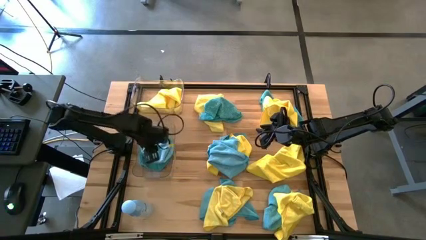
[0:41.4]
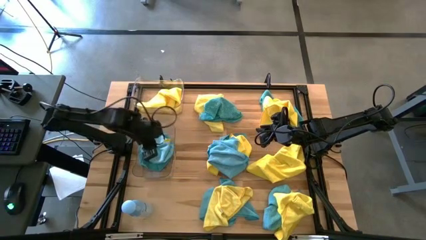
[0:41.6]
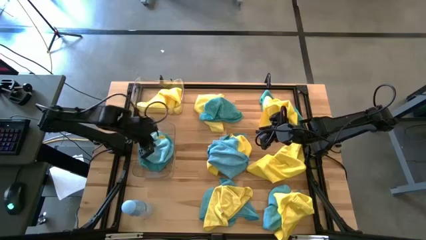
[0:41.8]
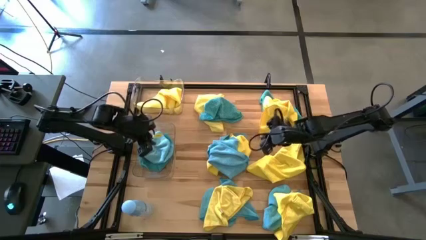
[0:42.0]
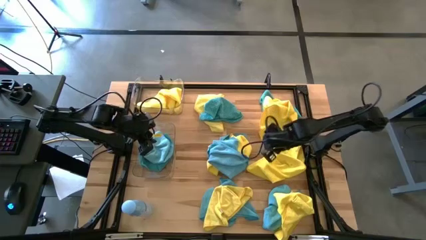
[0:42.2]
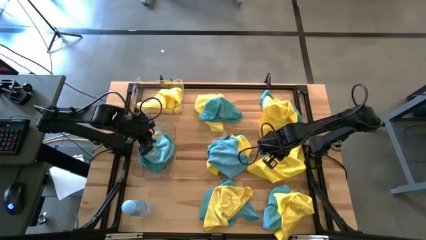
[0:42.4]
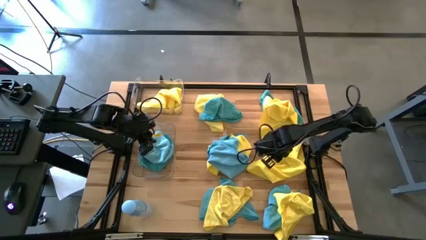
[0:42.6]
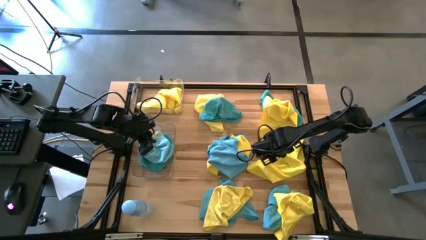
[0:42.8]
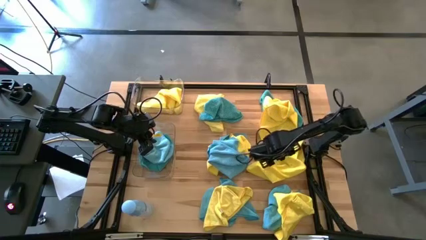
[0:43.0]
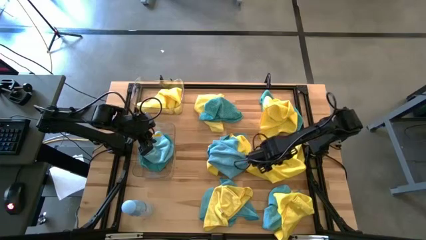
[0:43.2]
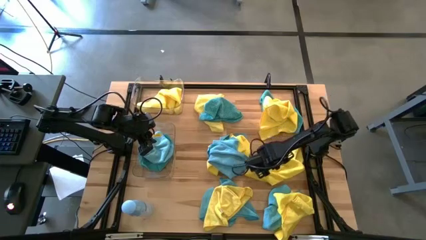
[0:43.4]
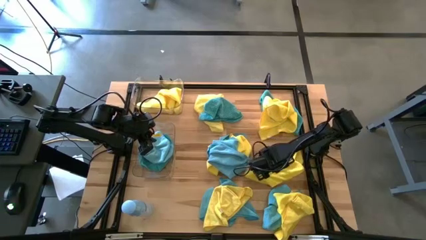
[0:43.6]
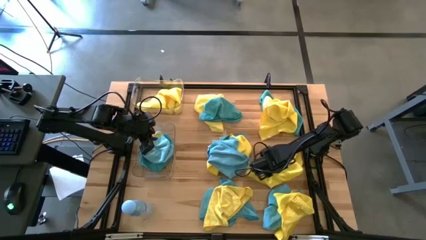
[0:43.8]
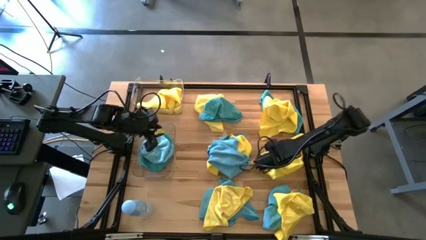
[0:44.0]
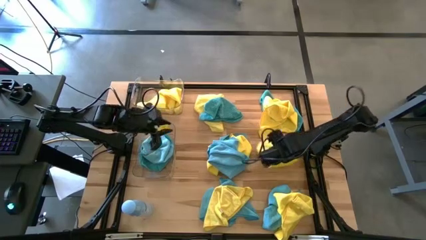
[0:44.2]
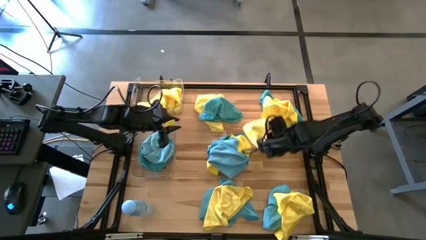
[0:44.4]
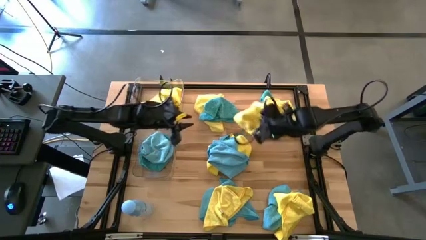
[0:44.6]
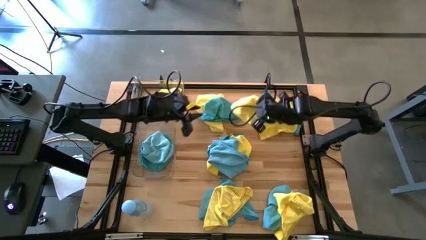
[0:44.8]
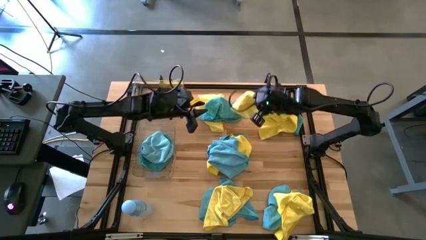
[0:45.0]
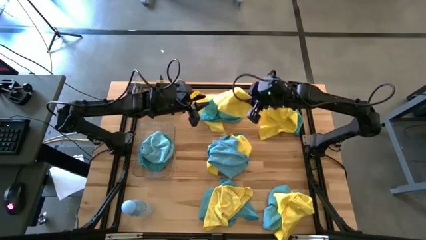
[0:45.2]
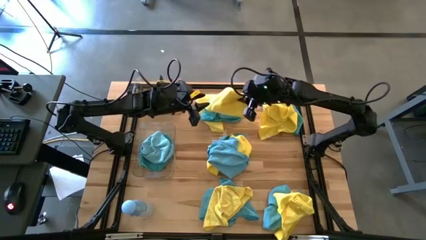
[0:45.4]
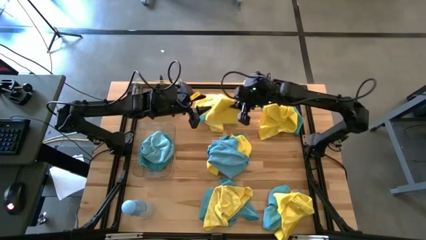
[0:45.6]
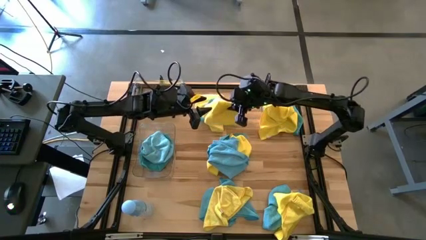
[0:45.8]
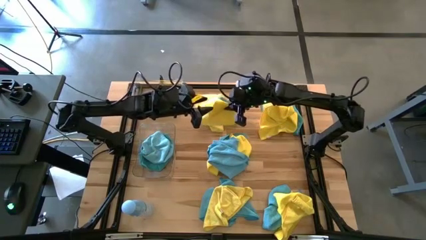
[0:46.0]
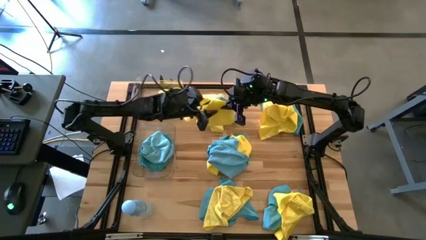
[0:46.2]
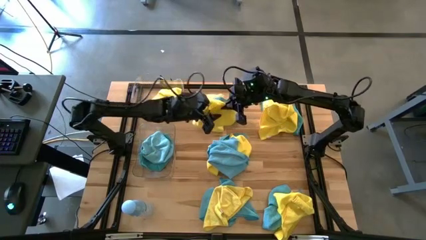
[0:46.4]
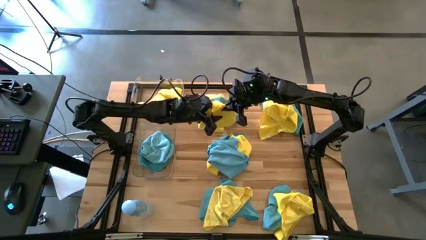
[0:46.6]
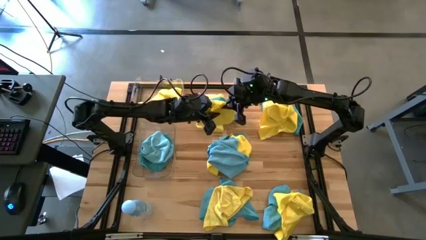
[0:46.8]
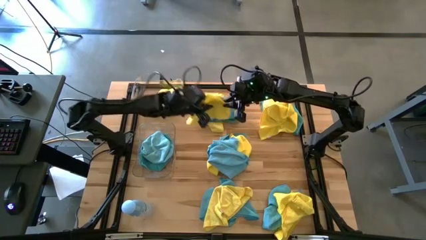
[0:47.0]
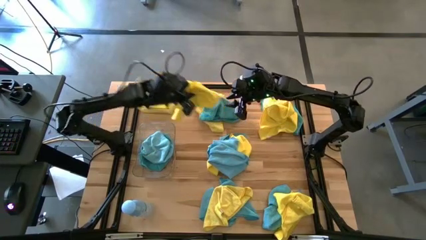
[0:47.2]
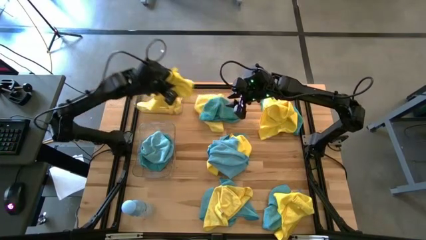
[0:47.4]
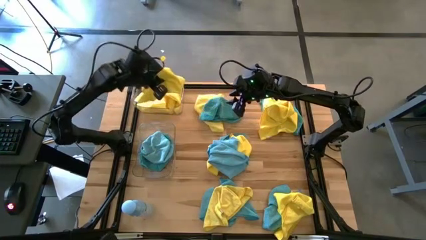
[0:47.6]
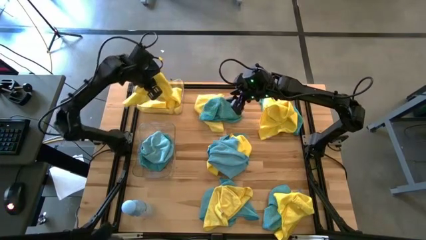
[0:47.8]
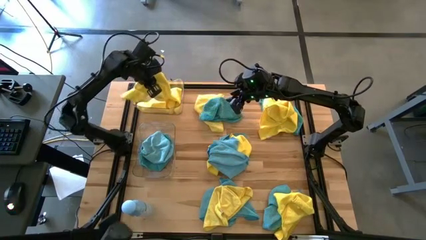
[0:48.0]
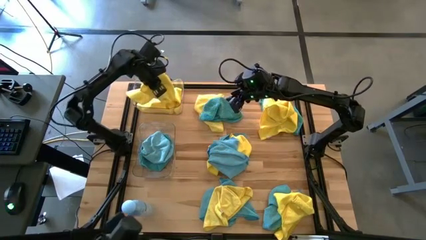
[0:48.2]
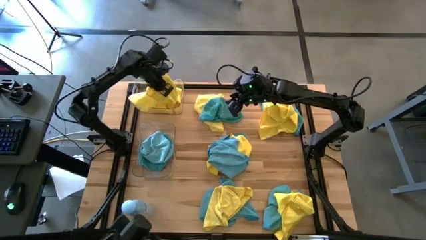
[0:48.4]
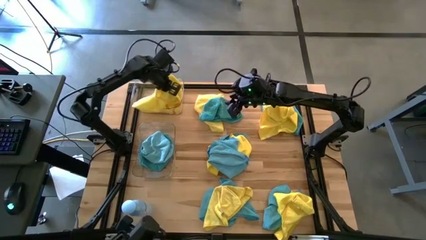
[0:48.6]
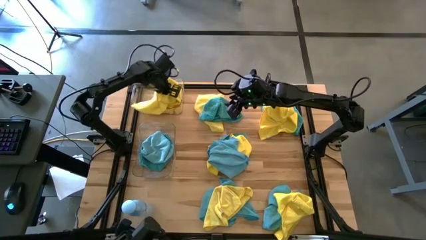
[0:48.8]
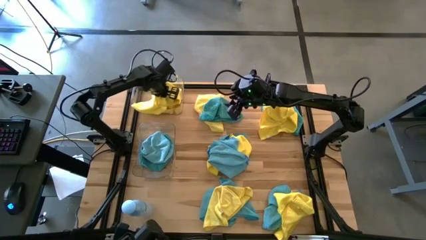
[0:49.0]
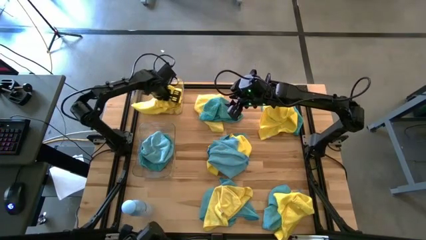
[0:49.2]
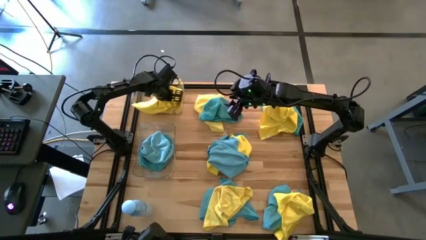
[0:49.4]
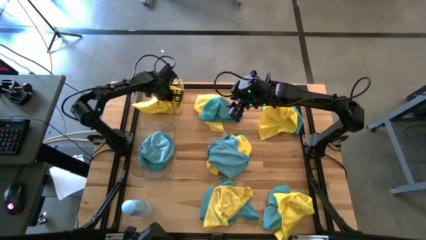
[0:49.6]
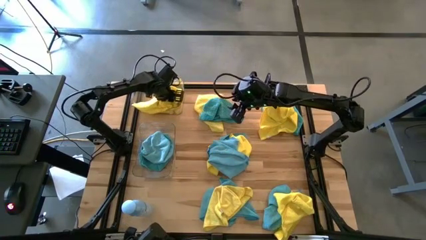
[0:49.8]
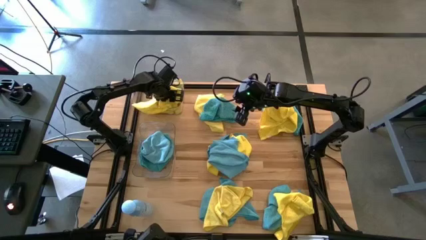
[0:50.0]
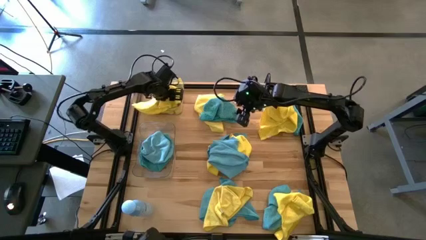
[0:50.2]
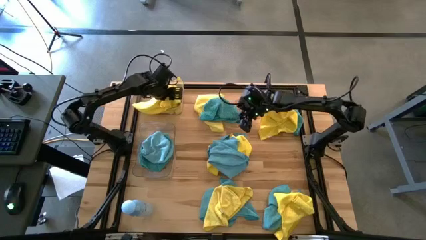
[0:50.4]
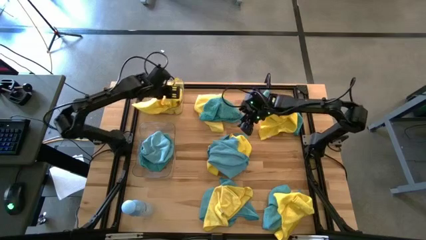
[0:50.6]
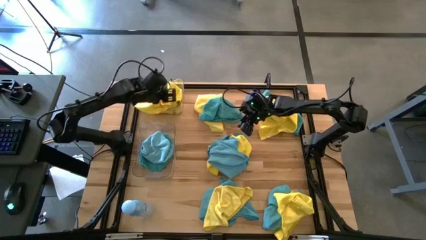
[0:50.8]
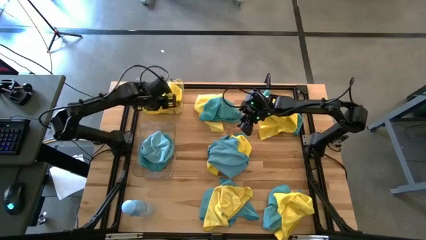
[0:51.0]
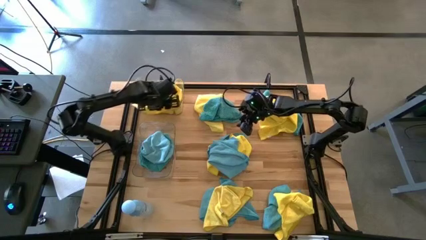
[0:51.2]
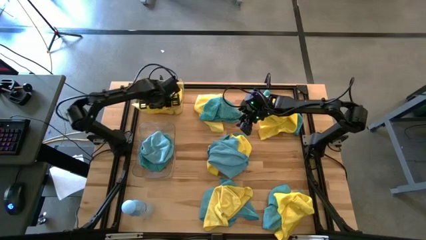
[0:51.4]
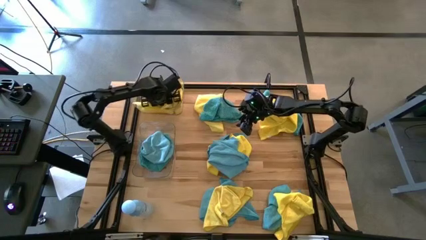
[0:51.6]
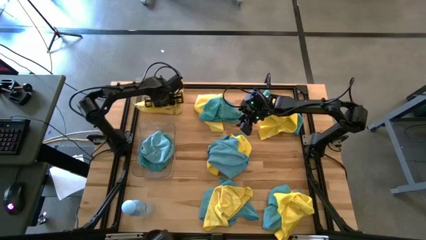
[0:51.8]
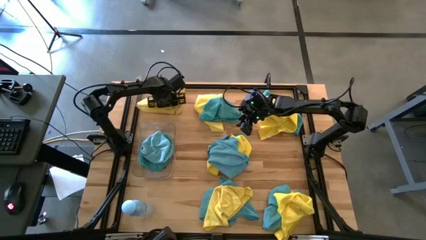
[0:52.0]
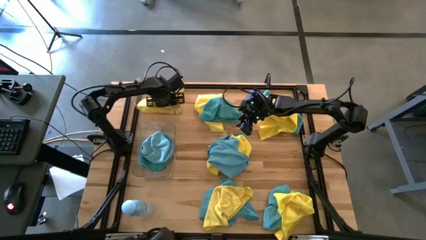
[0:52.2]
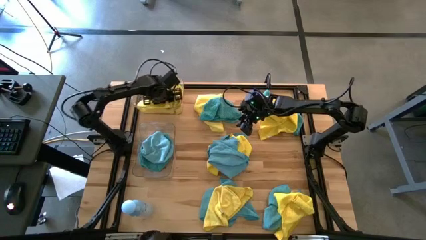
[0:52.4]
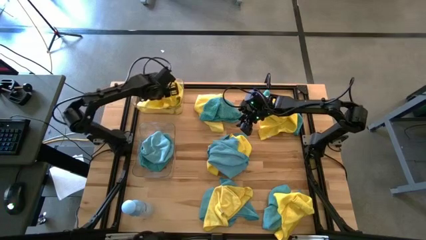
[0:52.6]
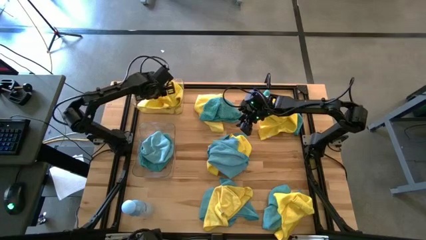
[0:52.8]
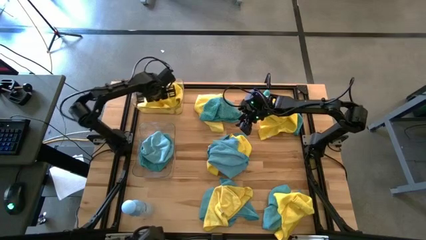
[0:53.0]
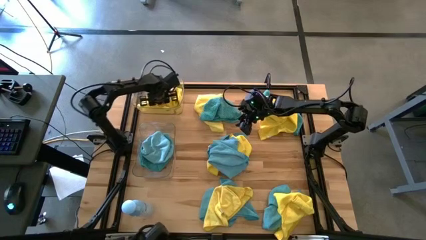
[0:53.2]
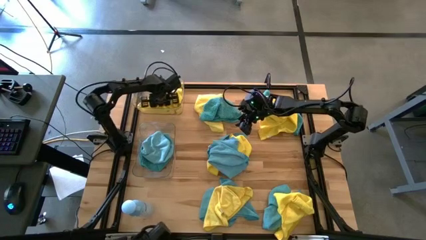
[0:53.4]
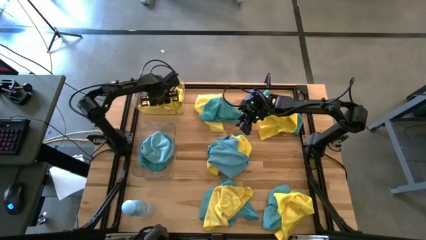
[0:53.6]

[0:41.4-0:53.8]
Task: Sort microfiber towel by color & place in baskets
Put the yellow microfiber cloth into the top transparent bin
